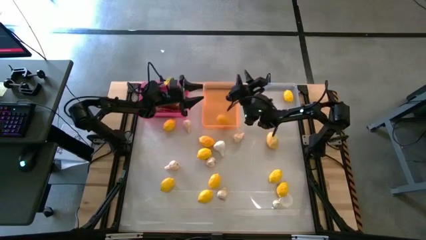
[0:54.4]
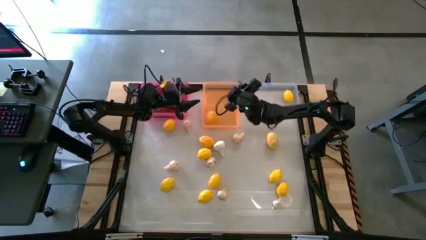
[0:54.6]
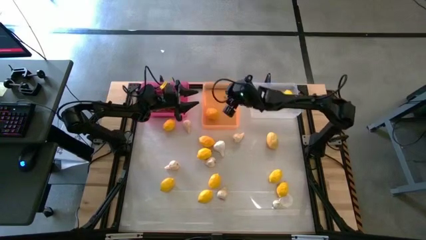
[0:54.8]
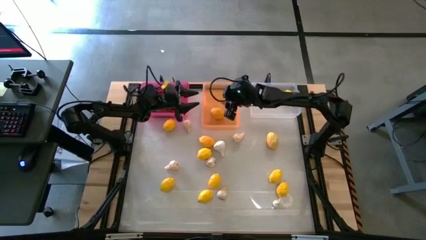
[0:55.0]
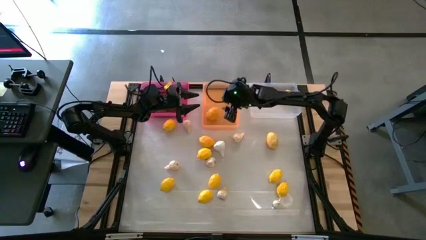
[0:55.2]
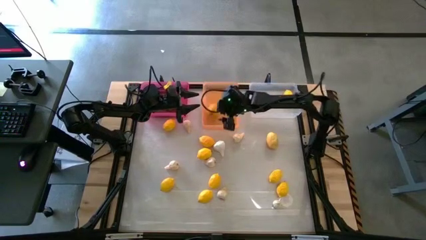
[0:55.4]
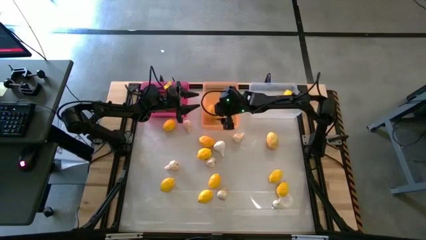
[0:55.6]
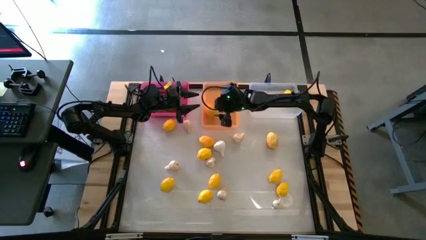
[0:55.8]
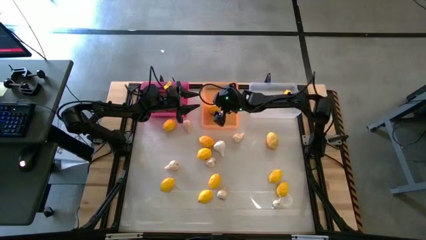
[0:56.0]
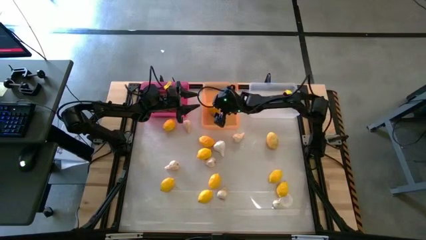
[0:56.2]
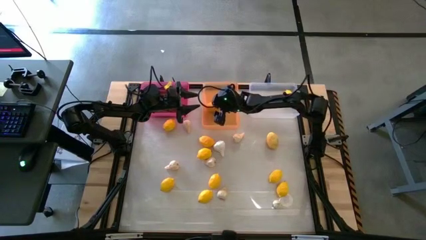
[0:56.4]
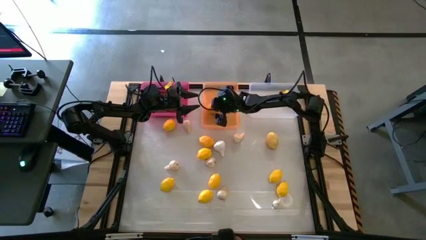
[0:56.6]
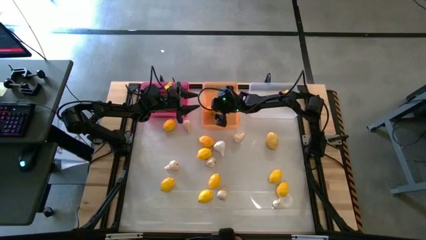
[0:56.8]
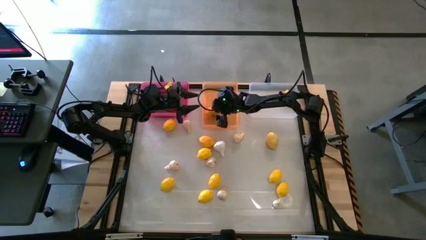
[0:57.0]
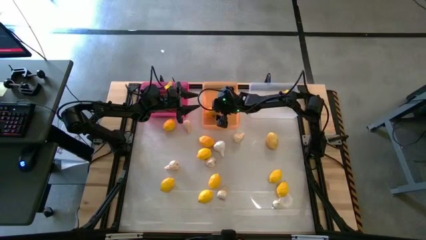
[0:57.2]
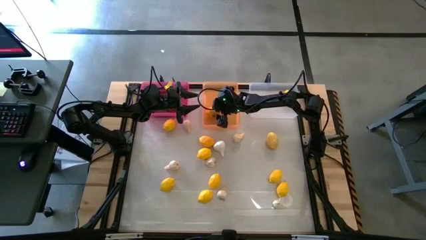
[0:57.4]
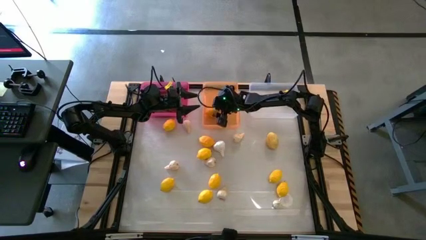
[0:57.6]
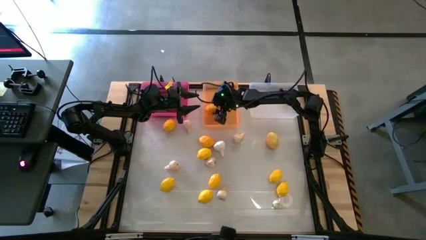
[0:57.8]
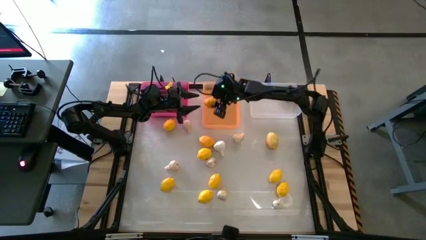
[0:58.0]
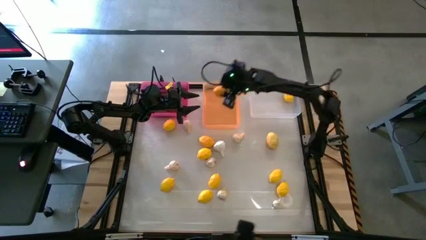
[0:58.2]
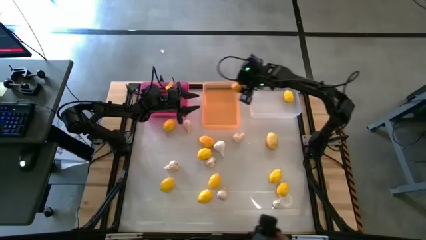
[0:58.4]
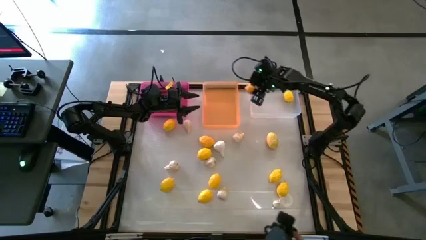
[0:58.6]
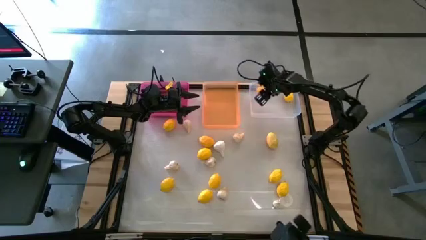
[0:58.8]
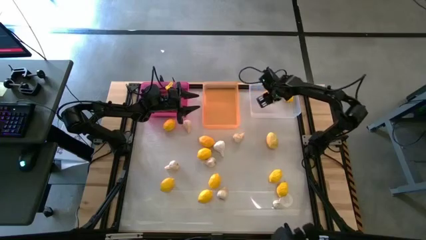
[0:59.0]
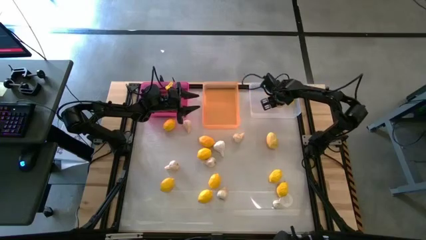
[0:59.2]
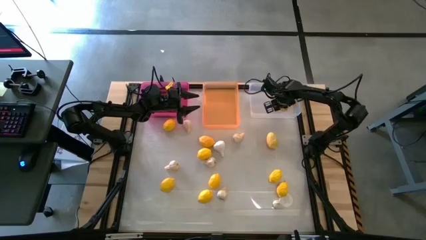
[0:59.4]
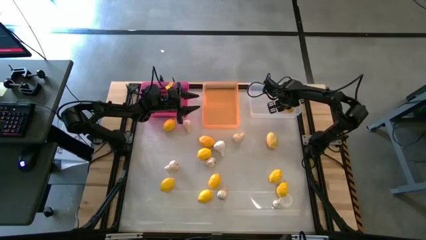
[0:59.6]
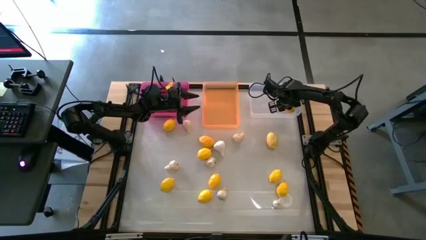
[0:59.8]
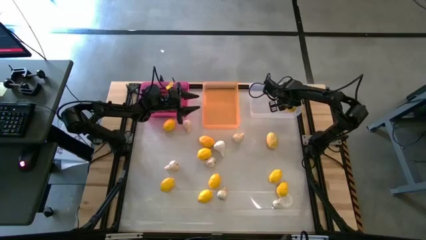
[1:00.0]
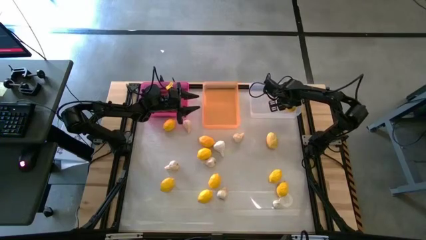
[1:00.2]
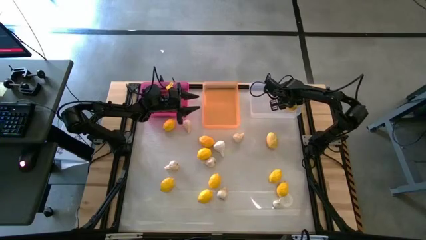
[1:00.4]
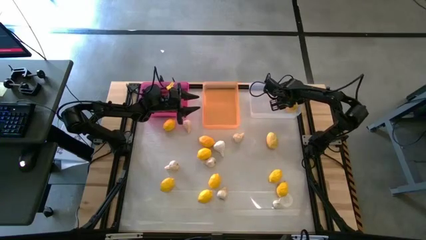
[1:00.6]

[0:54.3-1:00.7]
Task: Sort produce into baskets
Remove the yellow lemon from the orange bin and put it into the transparent bin

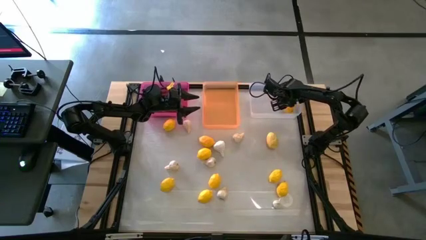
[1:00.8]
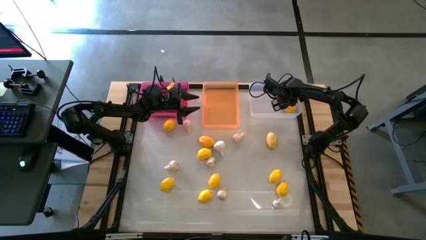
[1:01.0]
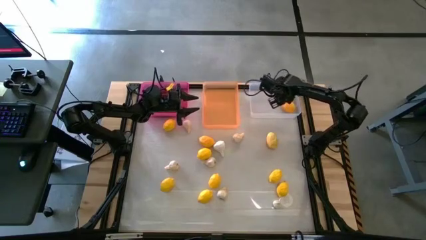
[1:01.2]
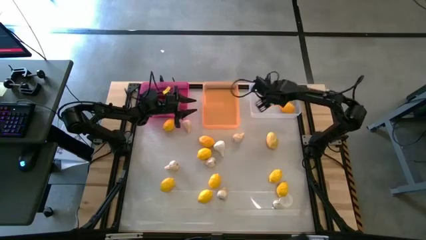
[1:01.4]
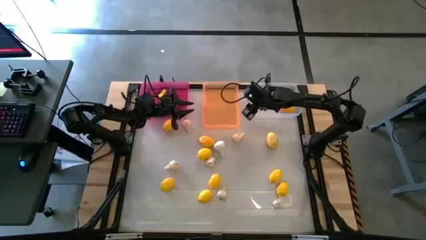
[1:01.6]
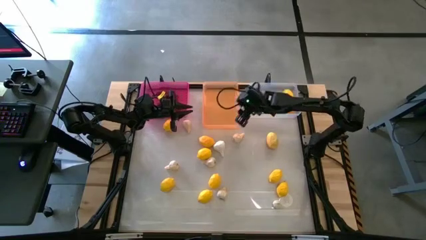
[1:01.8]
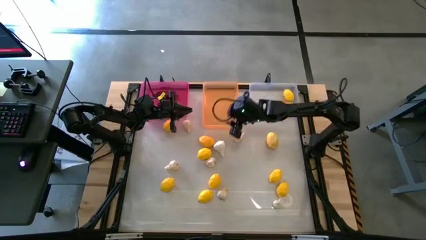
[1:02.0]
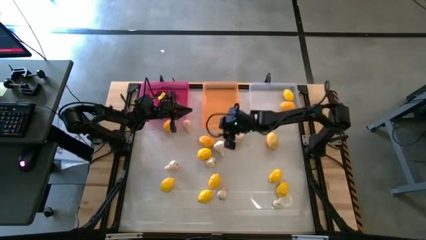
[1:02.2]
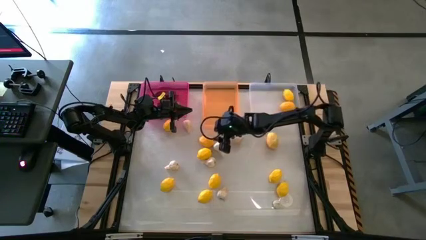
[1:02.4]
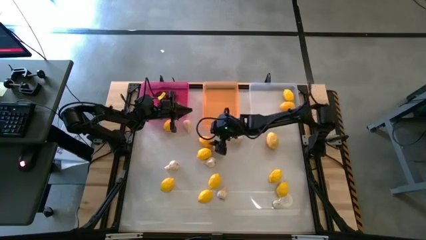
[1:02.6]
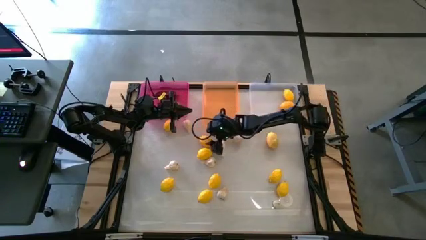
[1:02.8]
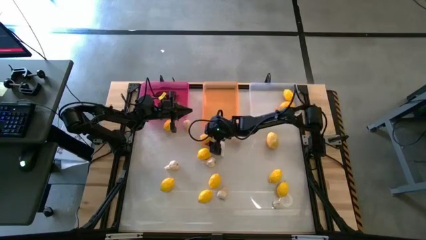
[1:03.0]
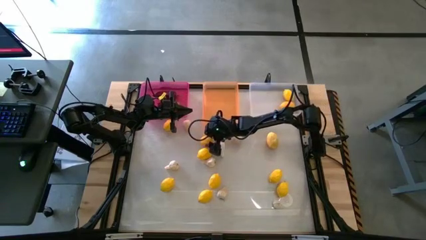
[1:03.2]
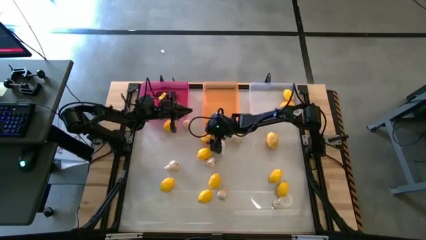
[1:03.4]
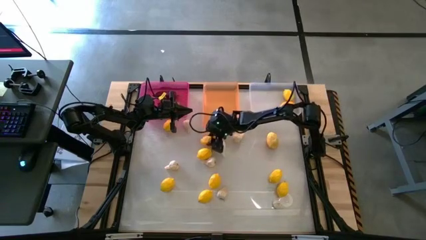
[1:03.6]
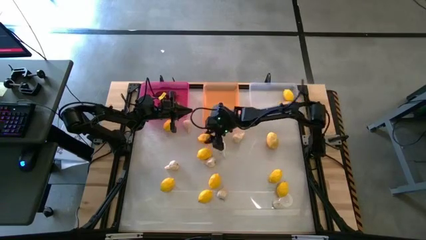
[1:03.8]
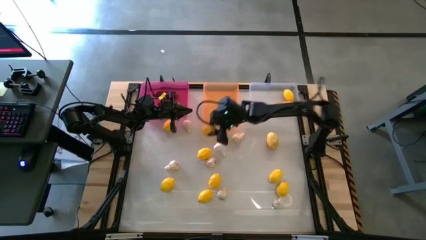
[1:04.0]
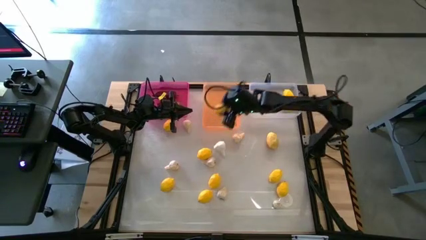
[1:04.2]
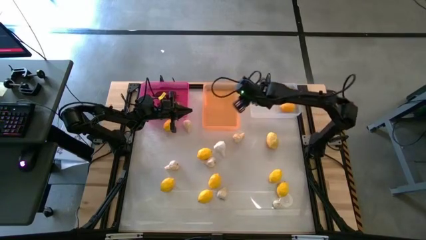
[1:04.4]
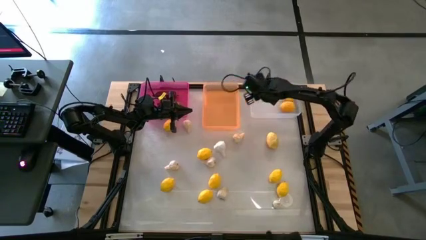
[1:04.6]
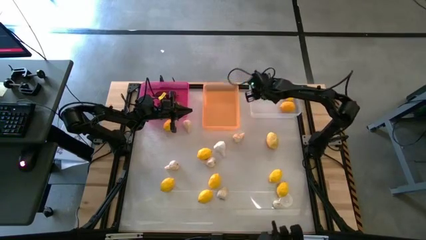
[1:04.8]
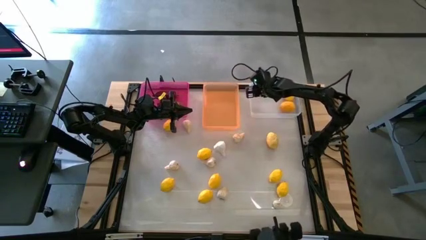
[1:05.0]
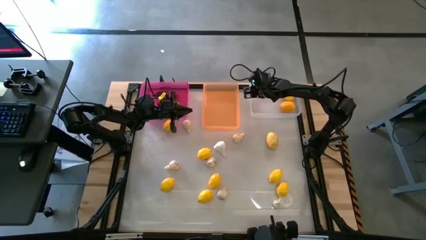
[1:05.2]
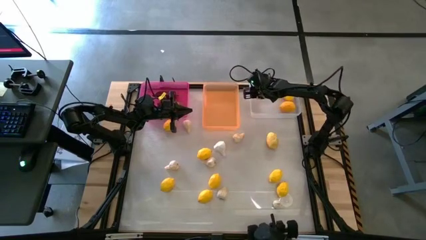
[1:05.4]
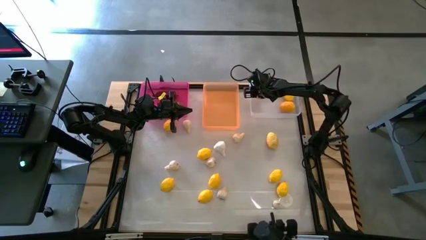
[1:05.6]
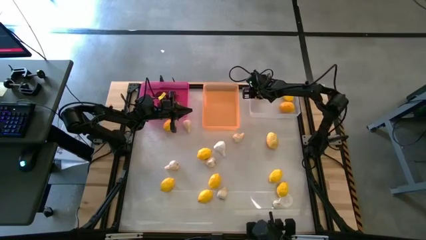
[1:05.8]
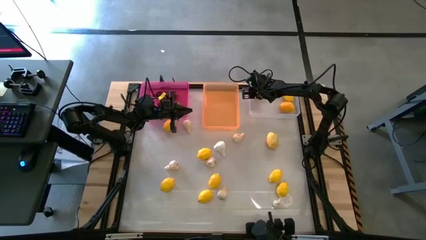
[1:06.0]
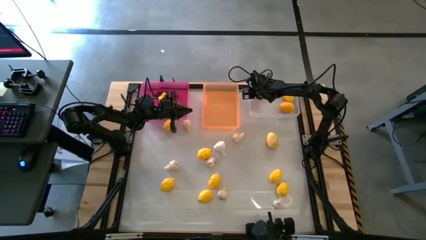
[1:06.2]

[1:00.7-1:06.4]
Put the yellow lemon into the transparent bin

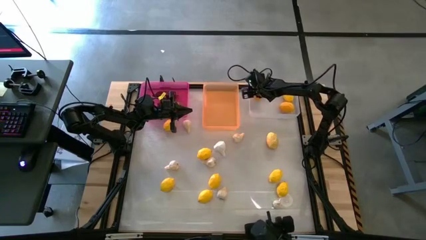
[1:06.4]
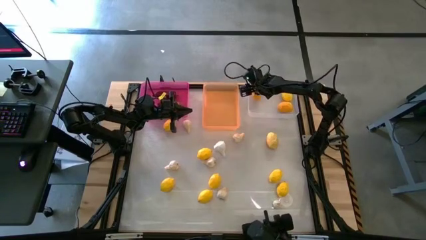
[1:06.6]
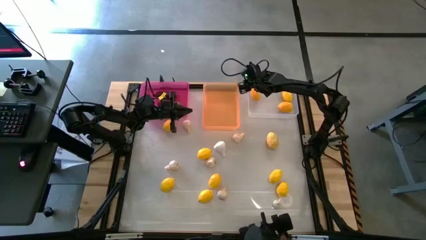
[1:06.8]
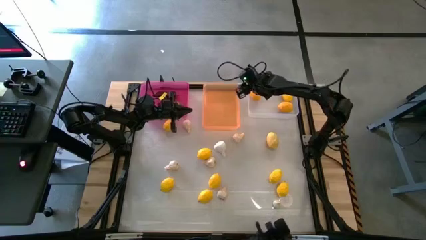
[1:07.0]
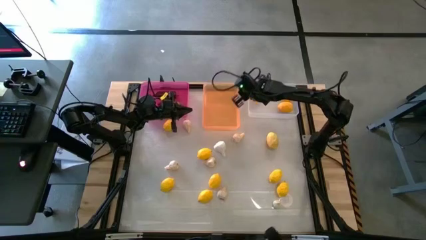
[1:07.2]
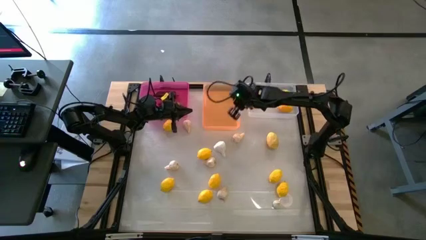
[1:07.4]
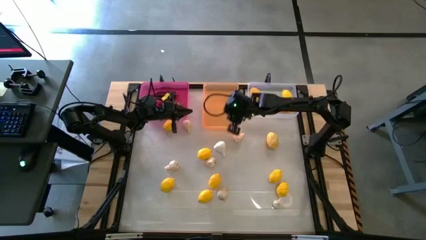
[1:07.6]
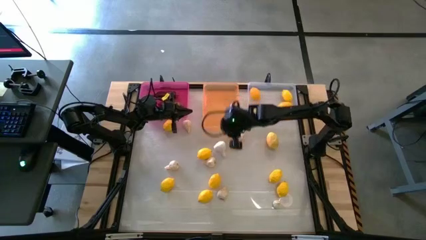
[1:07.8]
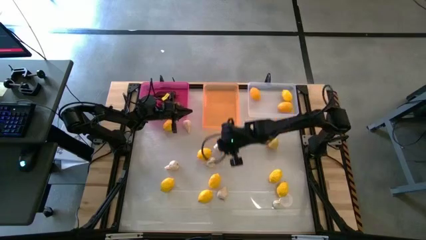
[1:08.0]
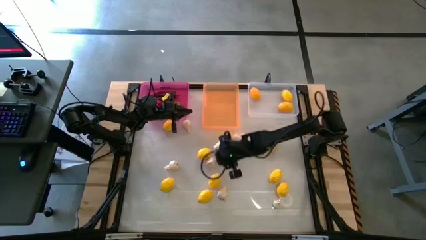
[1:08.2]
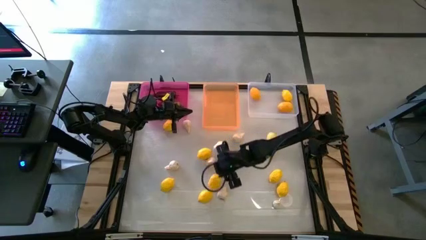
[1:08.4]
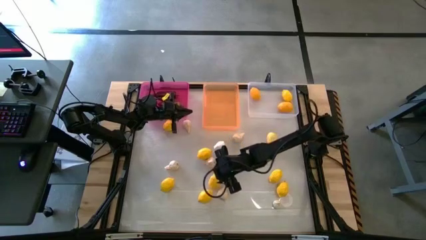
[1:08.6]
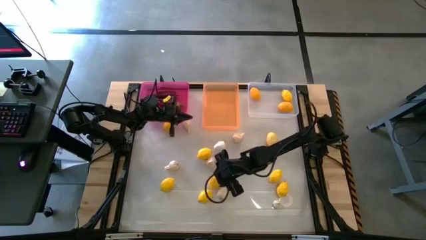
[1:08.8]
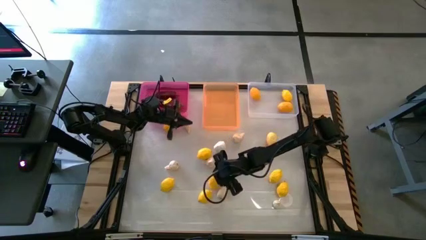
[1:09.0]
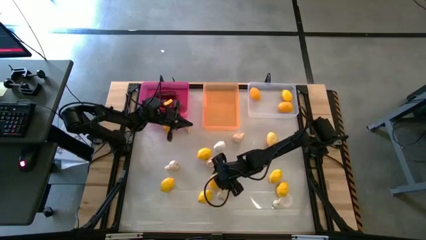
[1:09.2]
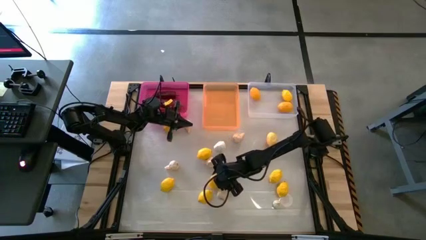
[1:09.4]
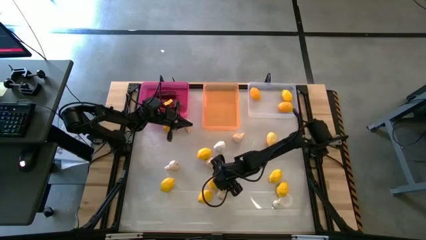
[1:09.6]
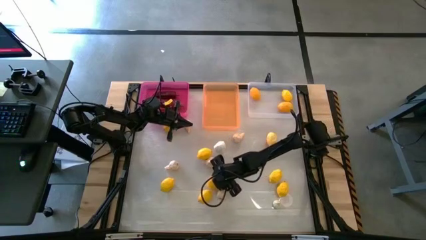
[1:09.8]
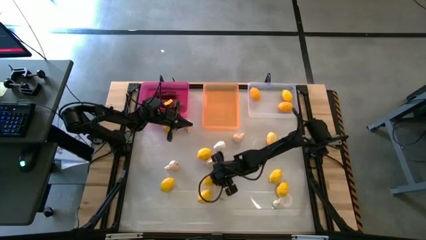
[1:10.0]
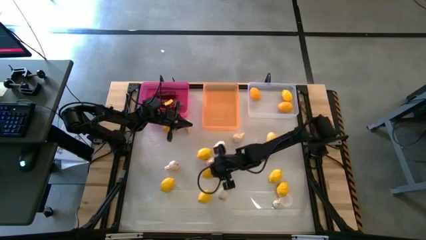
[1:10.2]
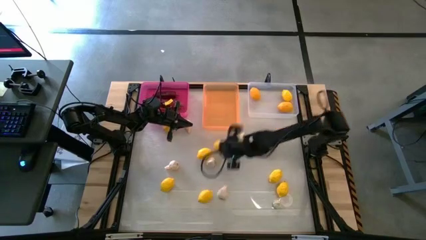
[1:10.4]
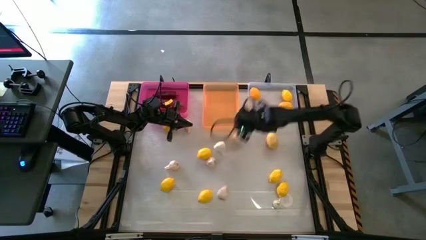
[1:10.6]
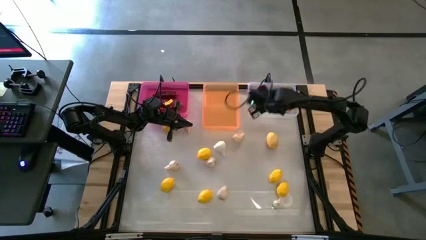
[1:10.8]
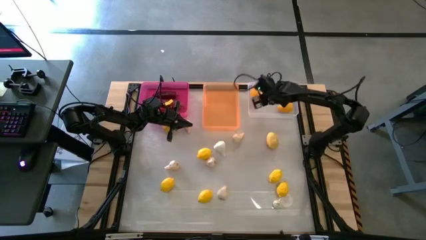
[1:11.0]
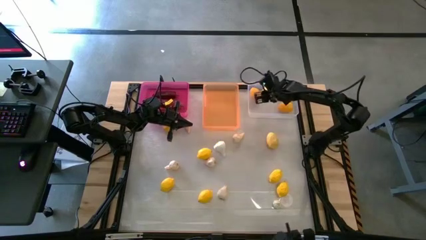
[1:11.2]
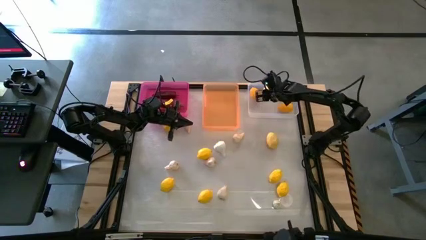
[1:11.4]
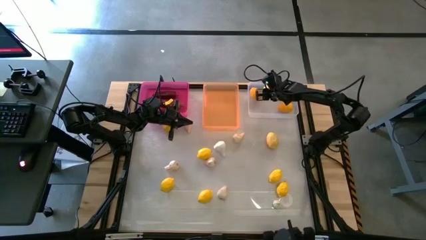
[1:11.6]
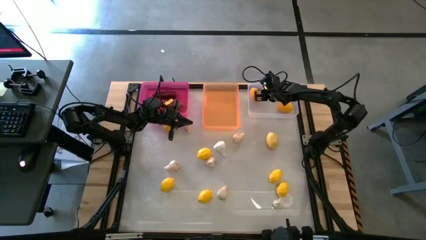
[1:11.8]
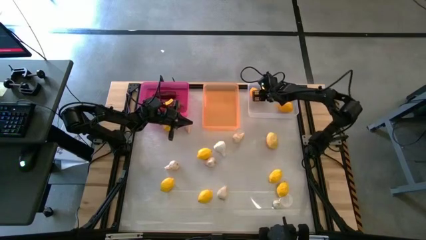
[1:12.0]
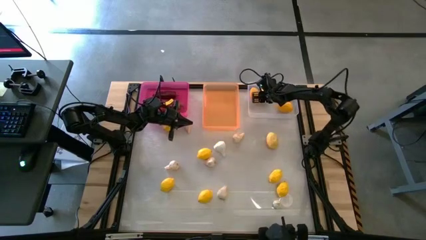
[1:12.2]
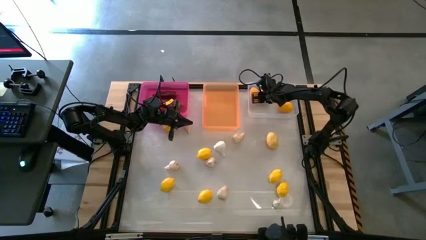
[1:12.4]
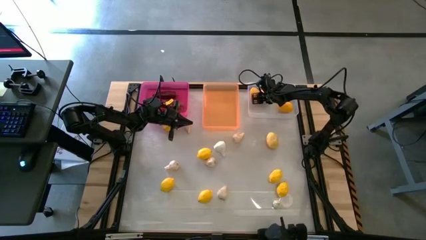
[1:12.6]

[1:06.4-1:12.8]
Put the yellow lemon into the transparent bin
